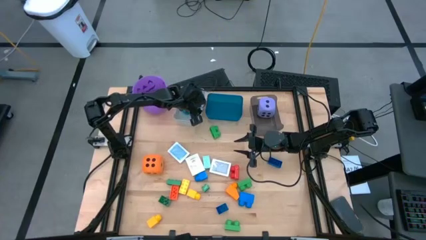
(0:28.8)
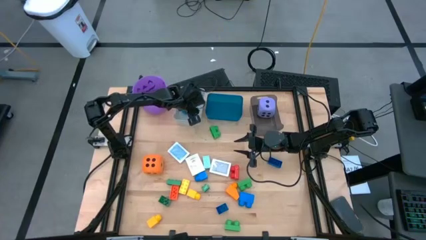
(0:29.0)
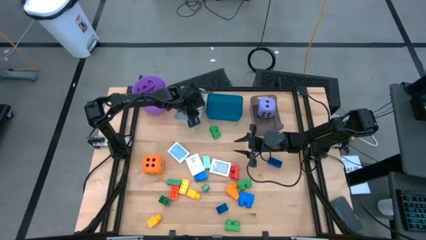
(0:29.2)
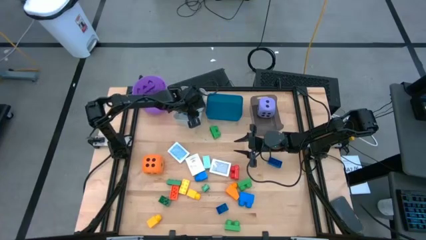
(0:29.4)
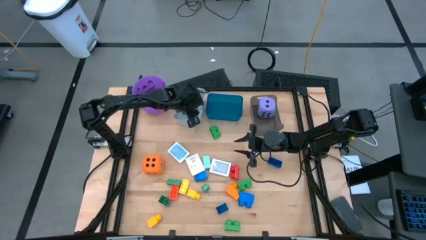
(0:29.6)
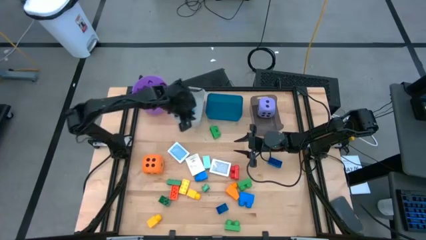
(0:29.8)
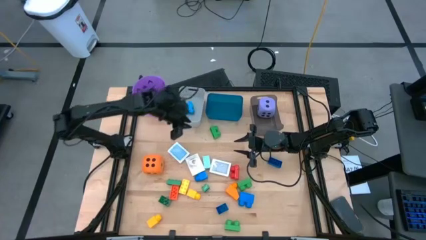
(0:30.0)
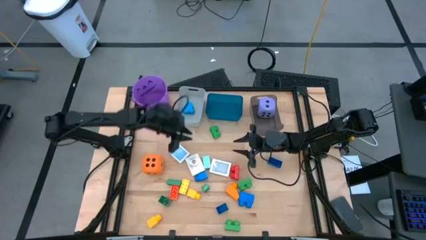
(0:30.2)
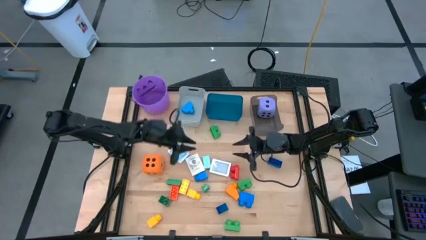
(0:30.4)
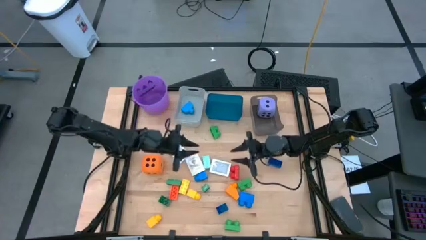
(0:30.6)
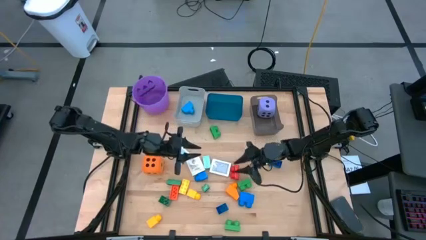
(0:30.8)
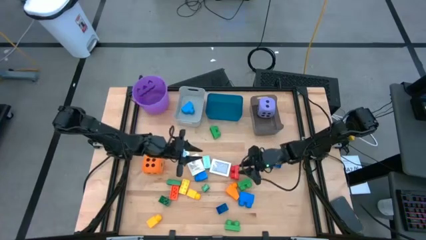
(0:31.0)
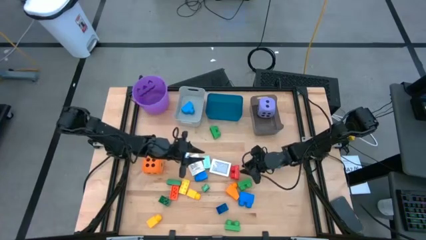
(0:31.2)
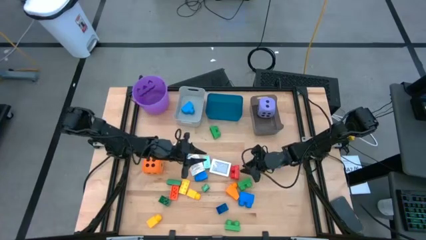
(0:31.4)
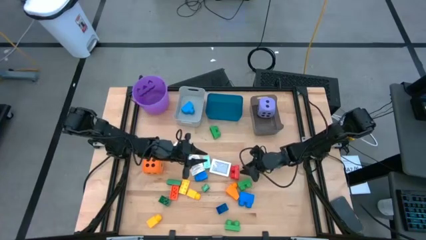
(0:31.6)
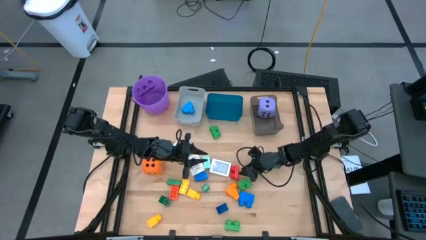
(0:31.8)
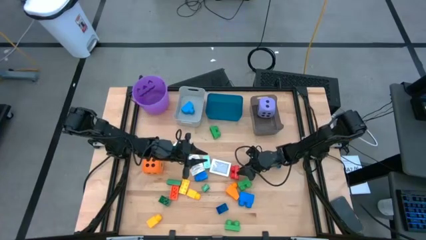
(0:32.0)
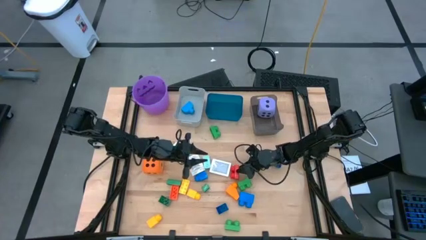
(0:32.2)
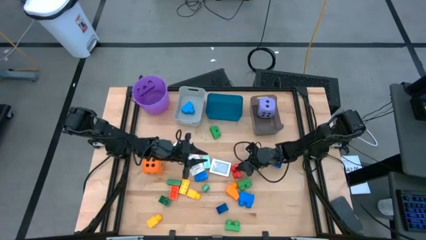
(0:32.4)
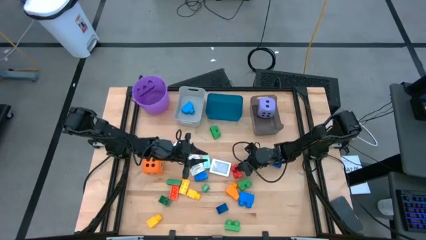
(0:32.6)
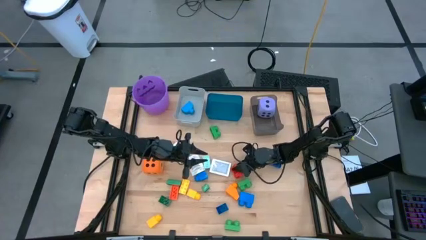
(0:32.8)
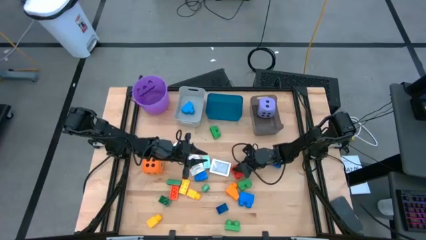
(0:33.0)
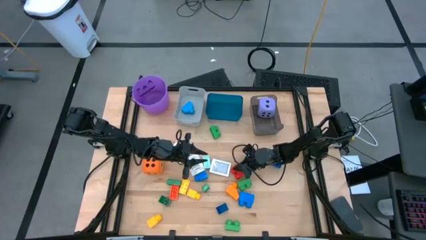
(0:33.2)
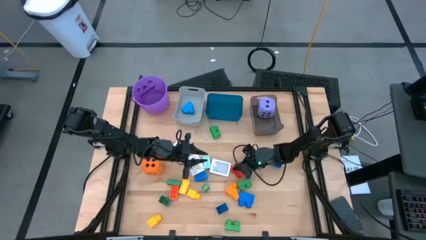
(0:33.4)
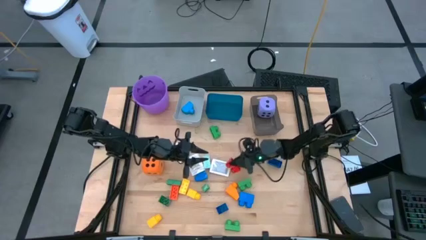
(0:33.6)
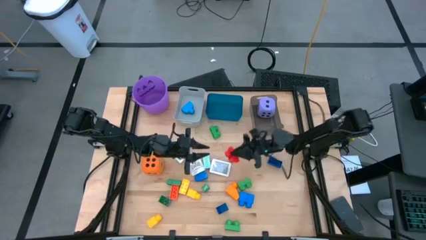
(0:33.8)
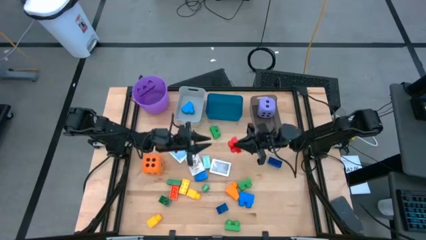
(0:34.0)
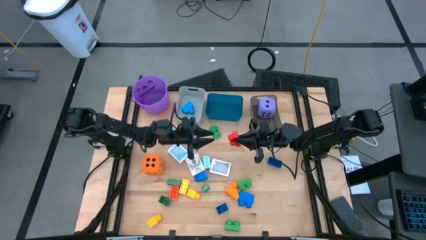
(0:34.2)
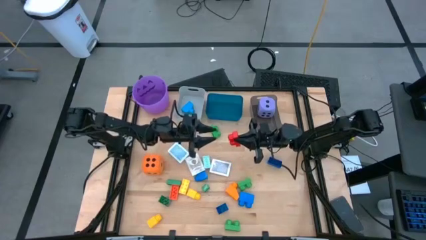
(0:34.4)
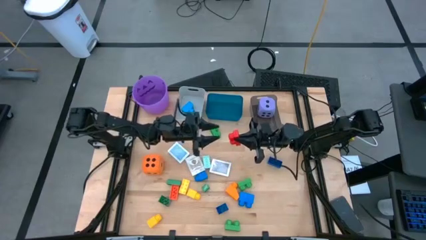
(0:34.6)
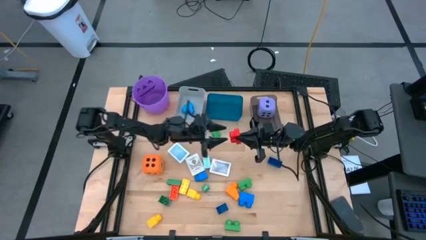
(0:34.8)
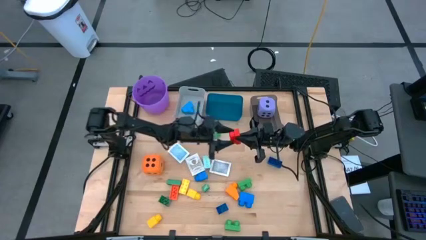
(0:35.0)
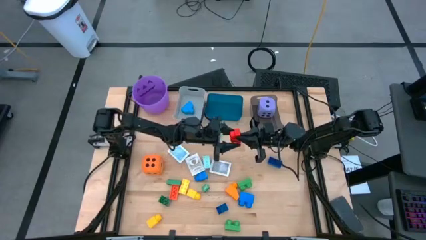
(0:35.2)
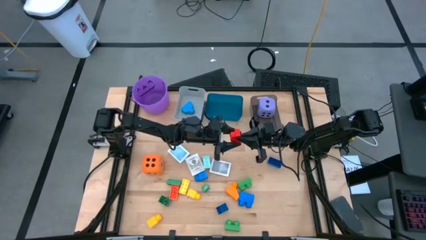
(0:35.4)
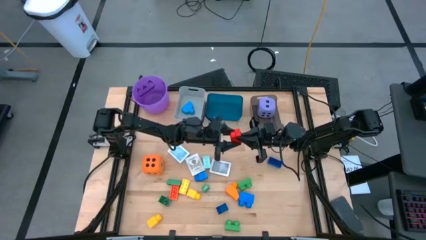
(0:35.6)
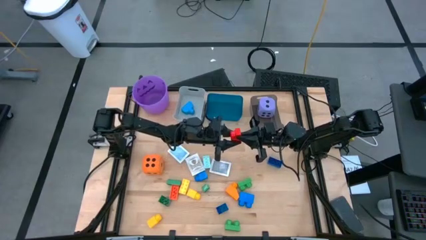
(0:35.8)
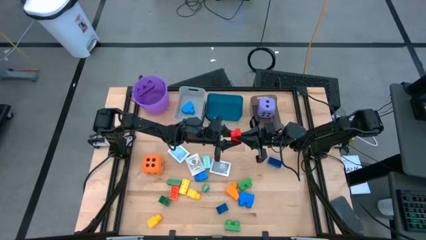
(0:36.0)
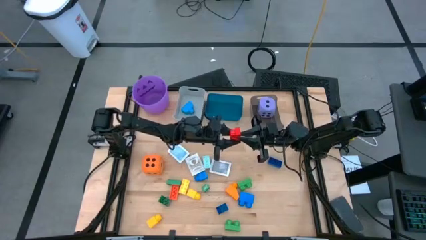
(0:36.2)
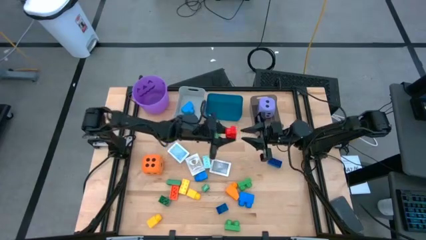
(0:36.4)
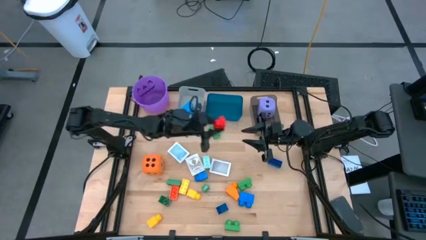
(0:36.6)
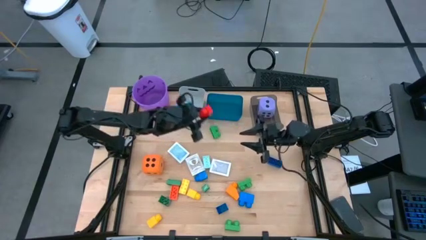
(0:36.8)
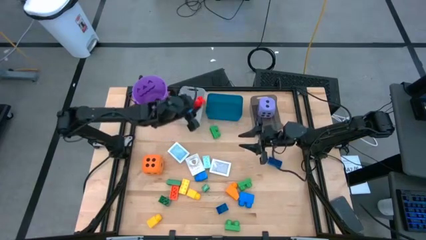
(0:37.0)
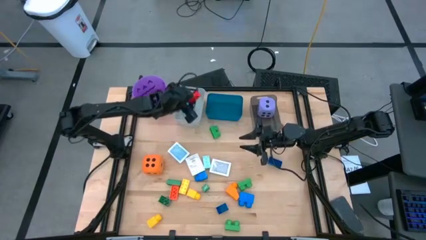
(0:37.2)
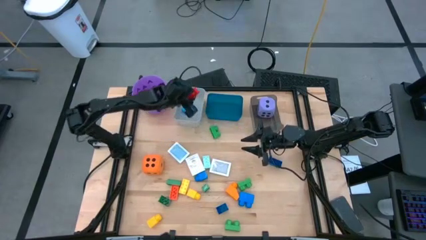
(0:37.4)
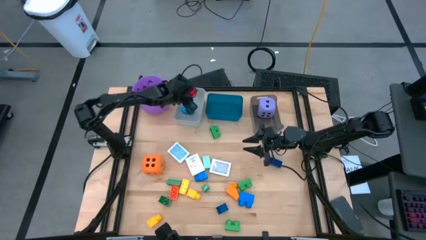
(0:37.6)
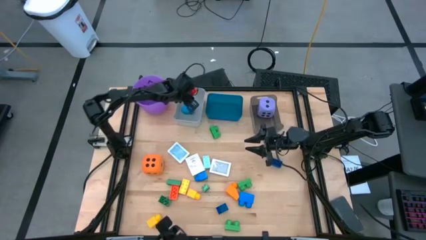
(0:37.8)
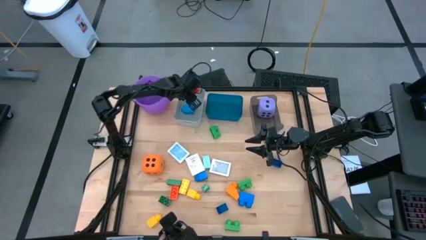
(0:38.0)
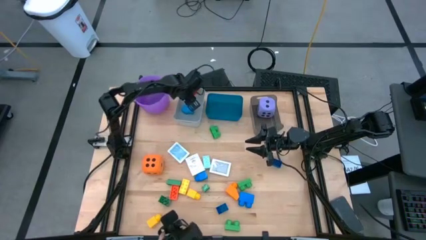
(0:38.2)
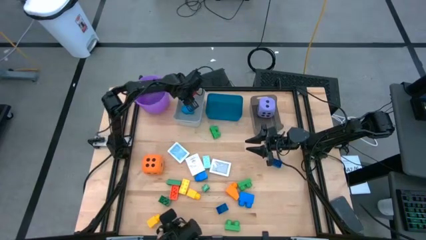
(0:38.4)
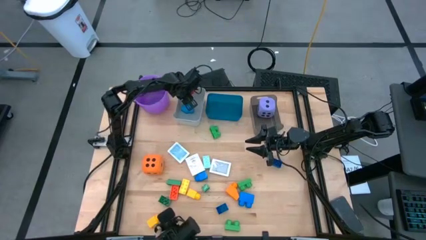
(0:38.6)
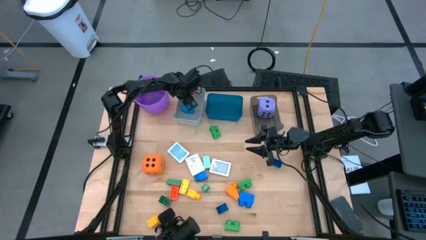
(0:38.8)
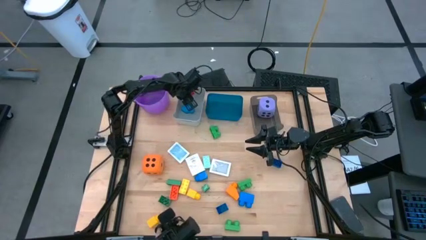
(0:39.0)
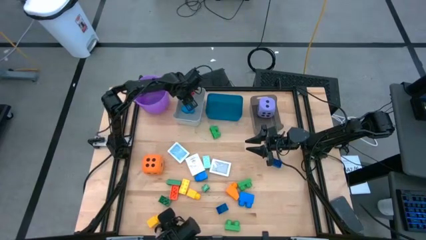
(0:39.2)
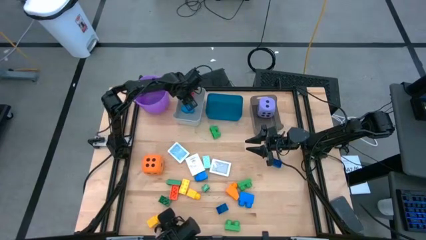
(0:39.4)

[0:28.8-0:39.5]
Task: Pick & Place Toys
Put the red game piece into the gray bin

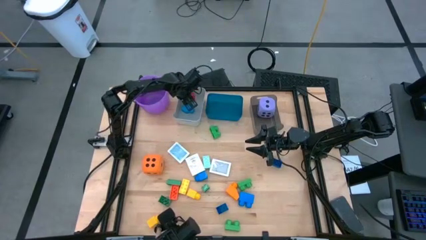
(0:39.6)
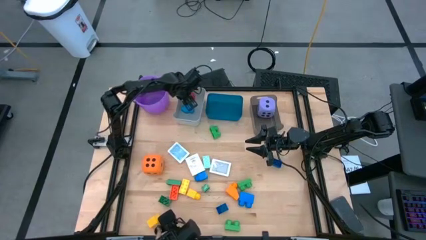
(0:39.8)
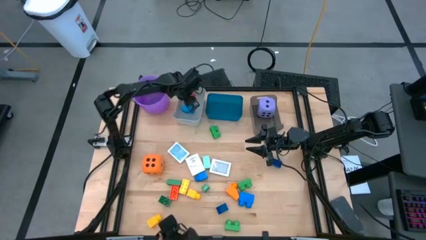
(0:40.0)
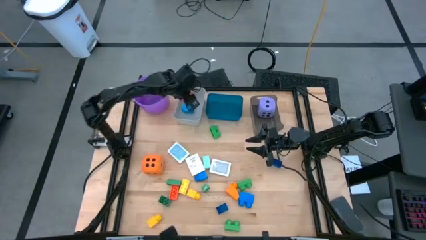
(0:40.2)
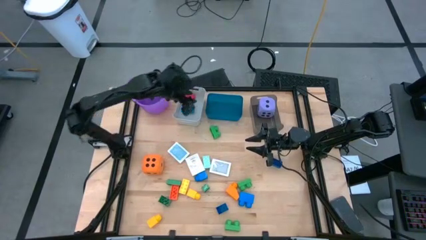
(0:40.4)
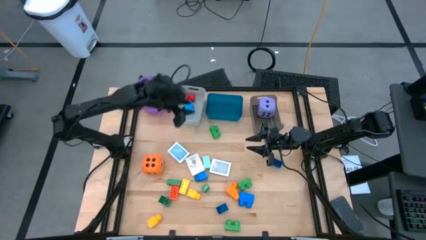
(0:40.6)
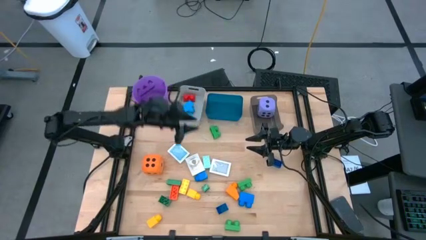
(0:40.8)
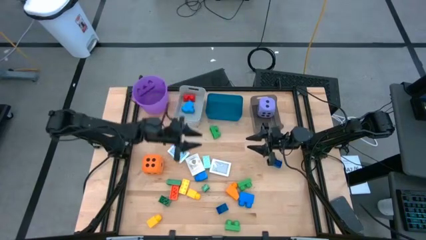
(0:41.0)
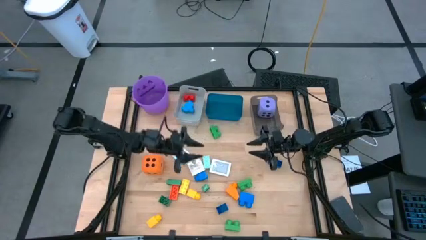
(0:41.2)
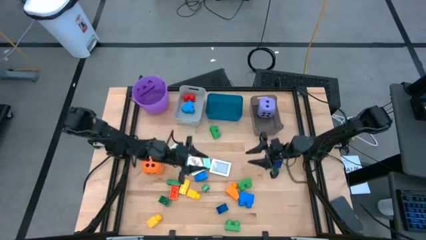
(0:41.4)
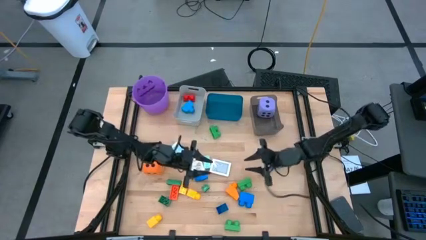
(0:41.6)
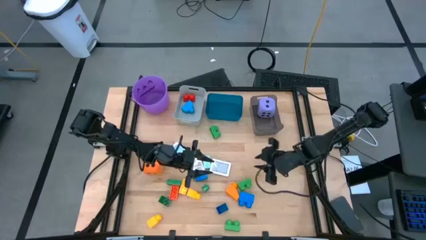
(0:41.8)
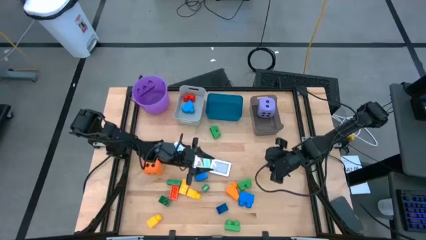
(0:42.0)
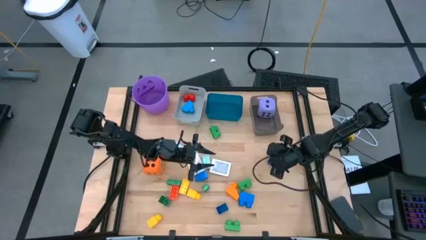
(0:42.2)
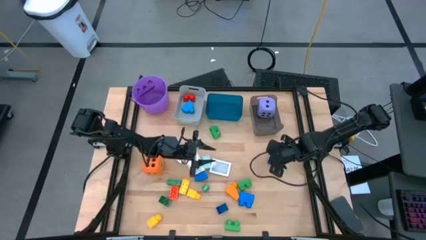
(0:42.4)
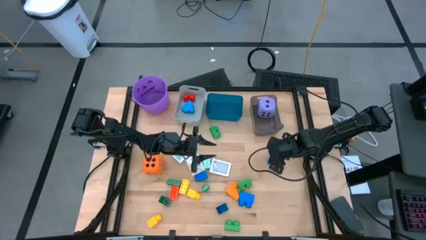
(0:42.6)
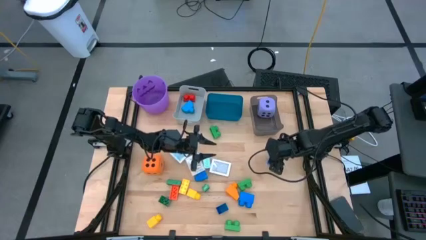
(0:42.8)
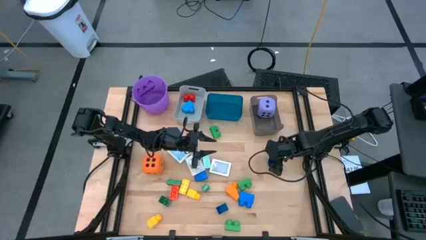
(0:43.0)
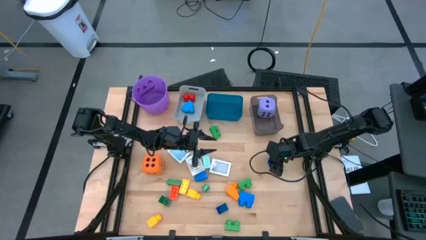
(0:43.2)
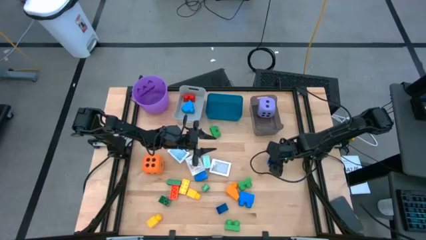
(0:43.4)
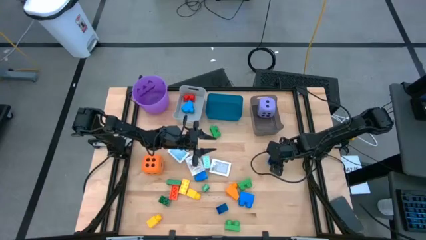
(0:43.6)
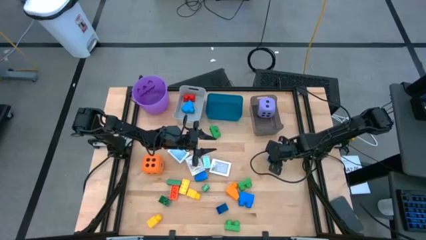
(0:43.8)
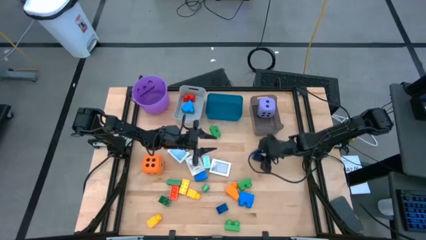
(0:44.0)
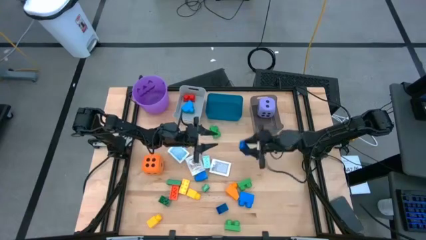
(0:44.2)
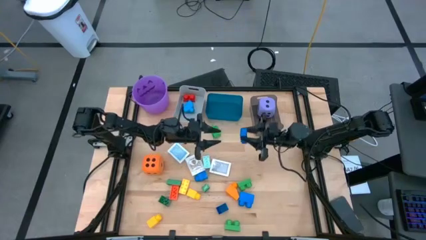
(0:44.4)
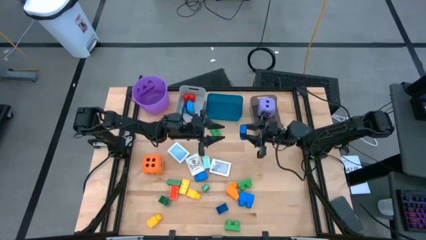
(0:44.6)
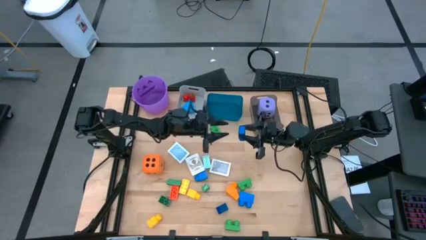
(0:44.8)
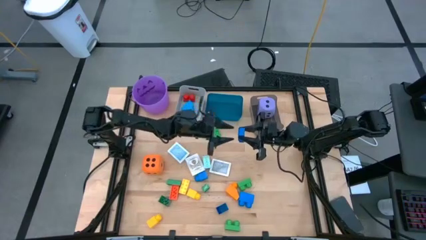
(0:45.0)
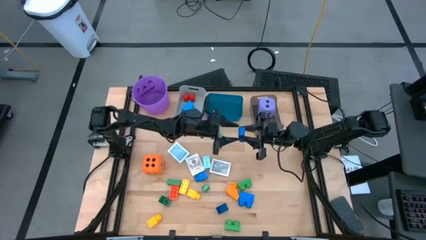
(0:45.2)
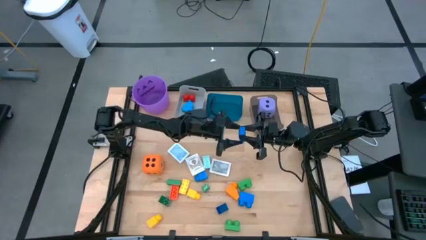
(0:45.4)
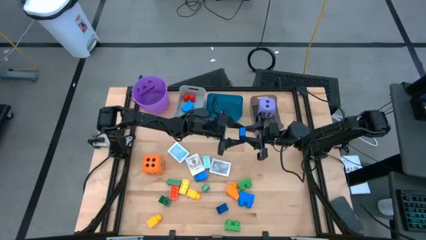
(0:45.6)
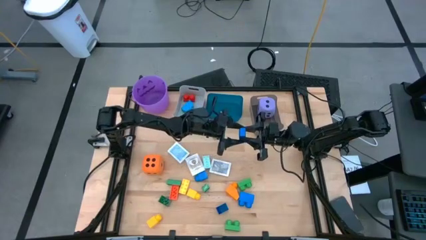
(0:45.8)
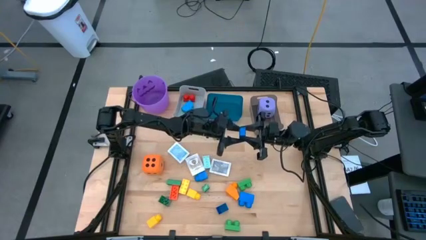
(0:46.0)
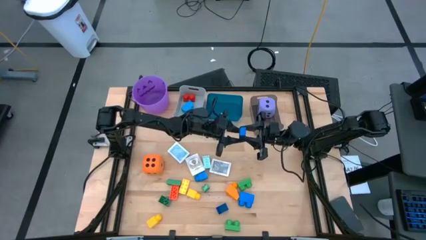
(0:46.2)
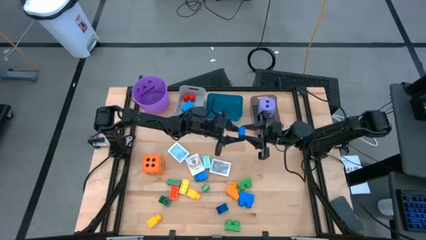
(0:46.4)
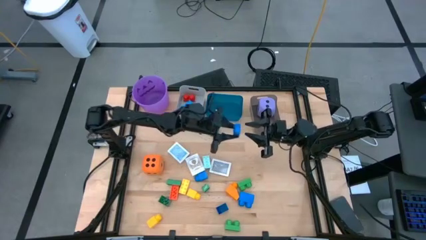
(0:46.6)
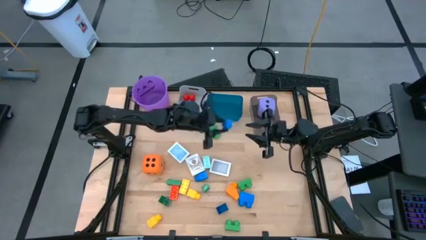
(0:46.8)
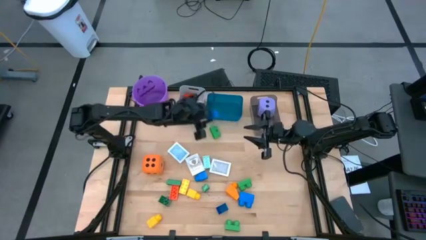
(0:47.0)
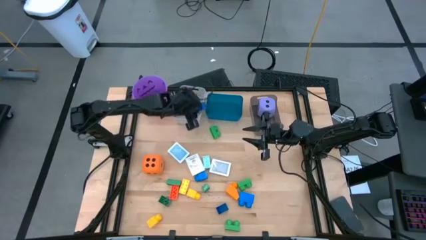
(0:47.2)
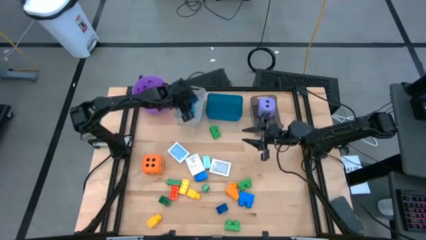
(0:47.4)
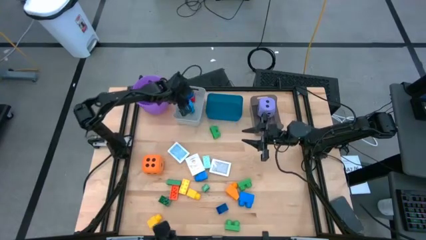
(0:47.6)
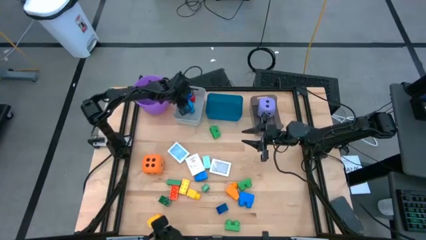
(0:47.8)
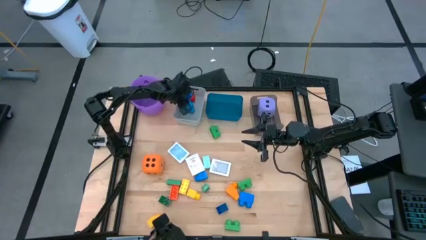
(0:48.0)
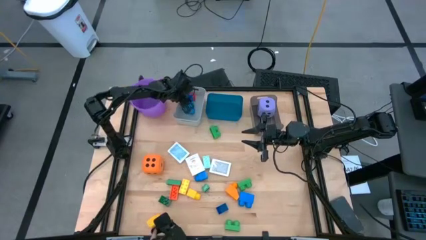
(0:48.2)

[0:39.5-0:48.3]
Put the dark blue game piece into the gray bin
